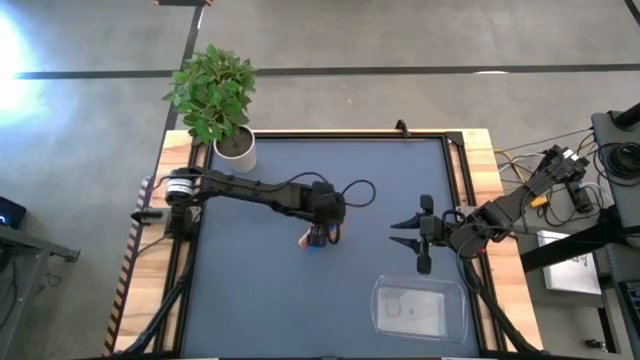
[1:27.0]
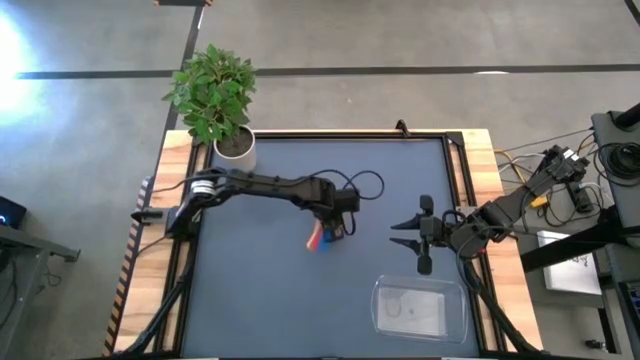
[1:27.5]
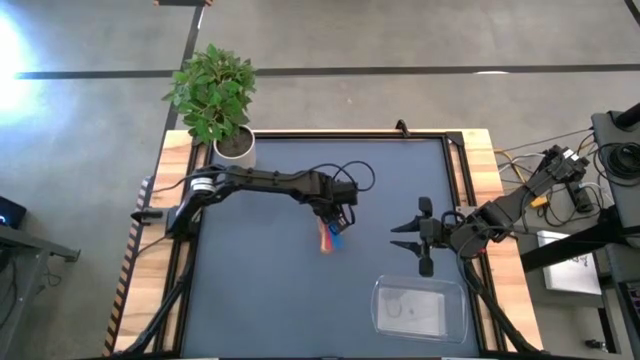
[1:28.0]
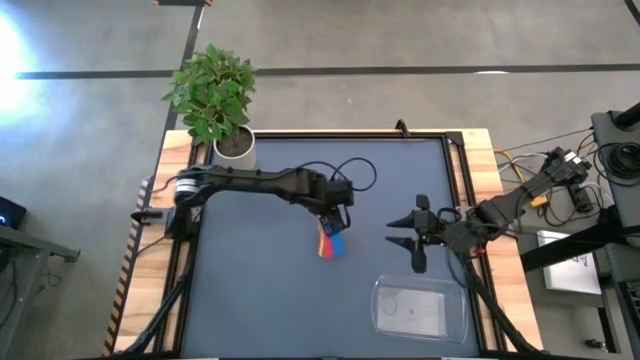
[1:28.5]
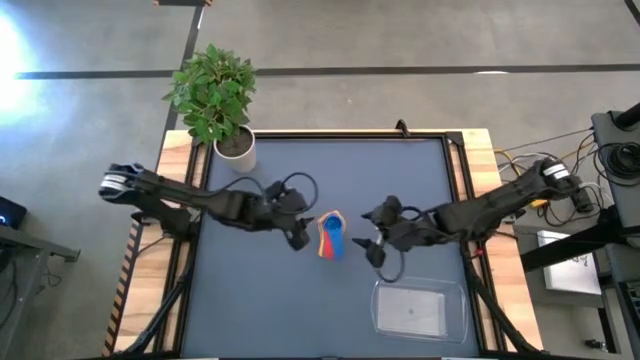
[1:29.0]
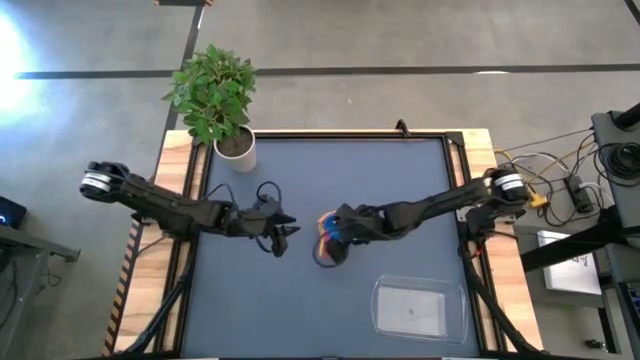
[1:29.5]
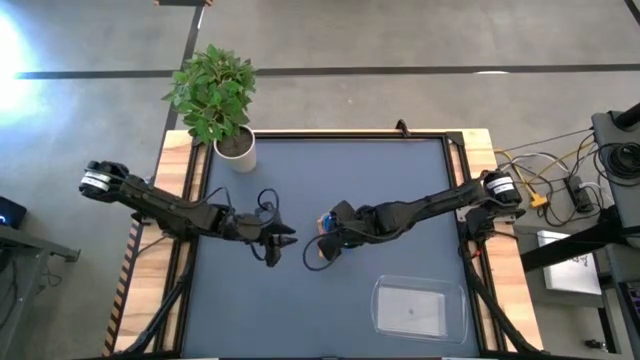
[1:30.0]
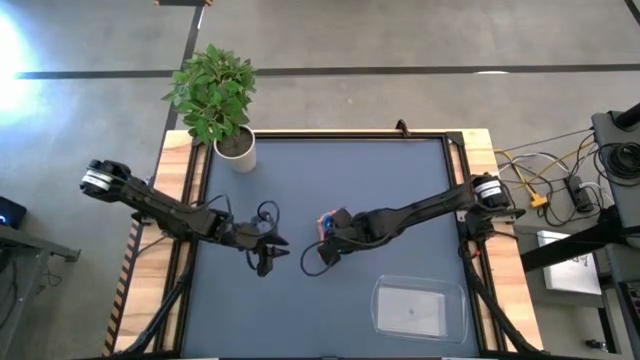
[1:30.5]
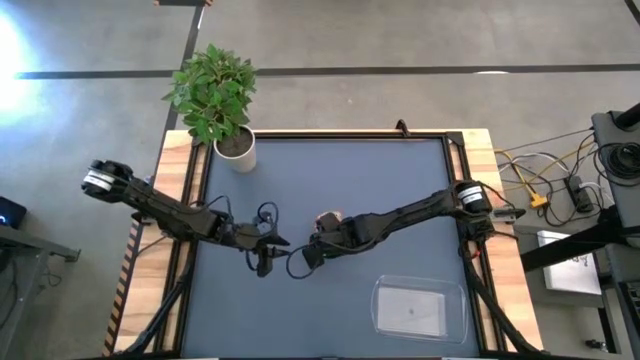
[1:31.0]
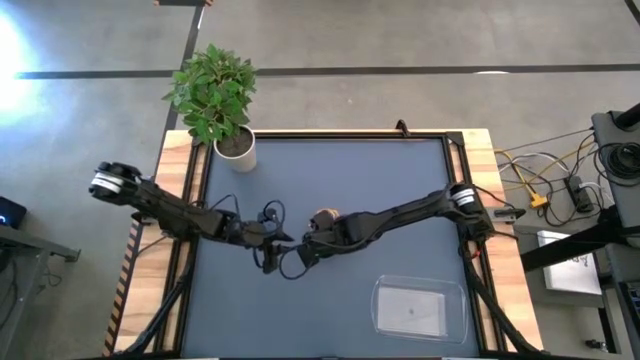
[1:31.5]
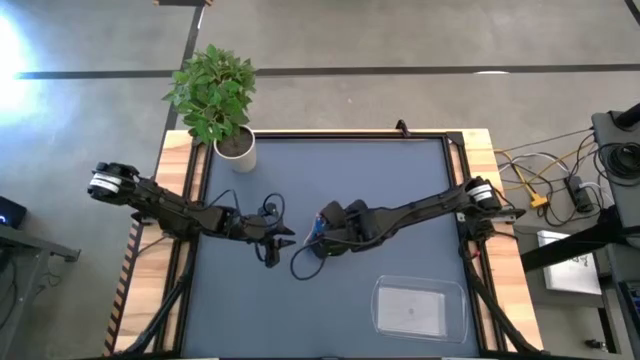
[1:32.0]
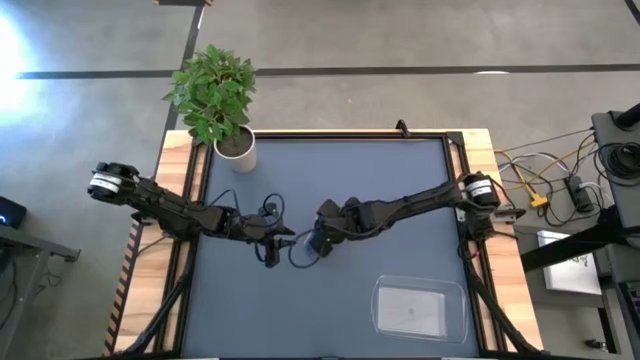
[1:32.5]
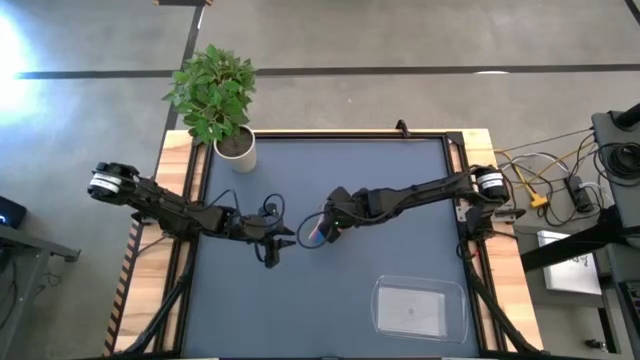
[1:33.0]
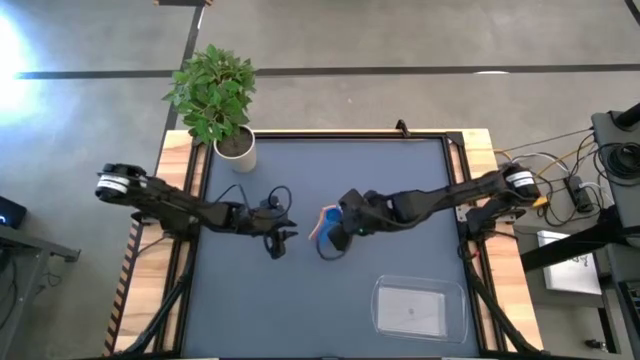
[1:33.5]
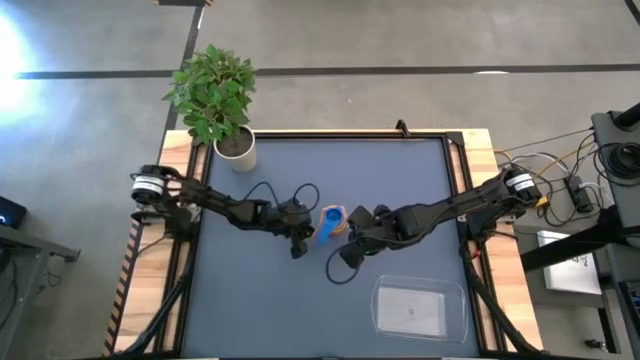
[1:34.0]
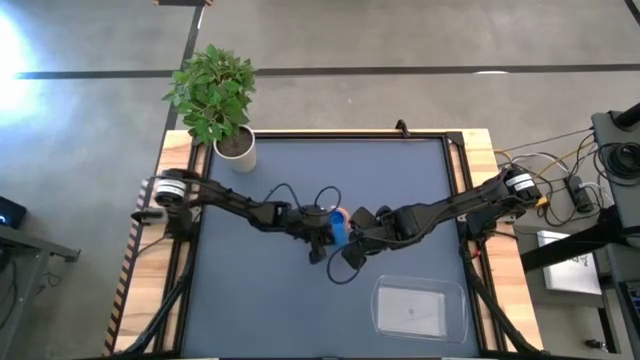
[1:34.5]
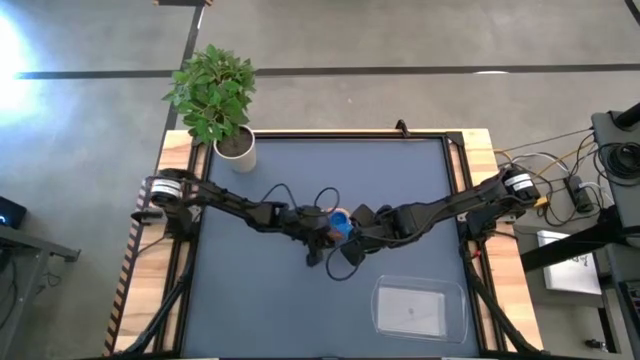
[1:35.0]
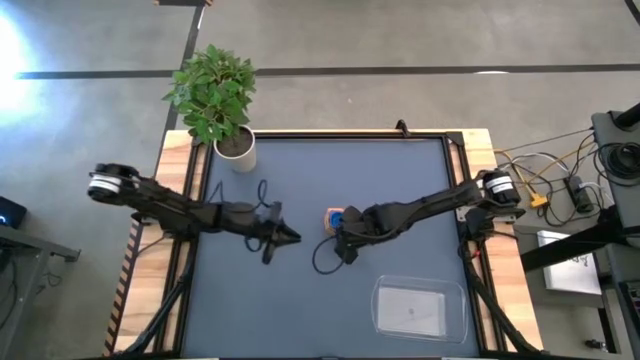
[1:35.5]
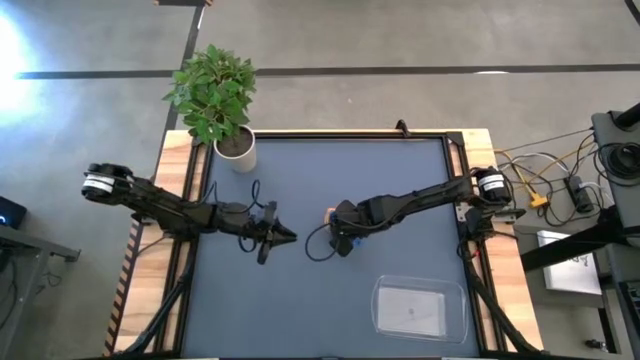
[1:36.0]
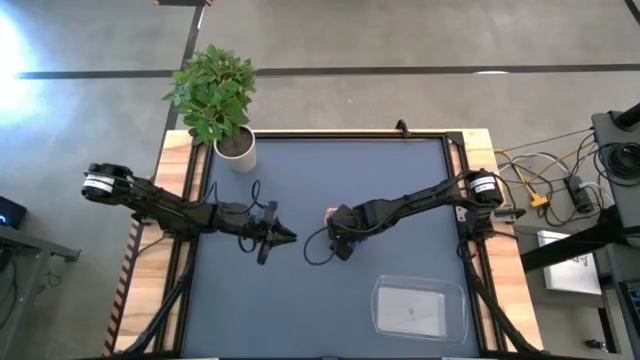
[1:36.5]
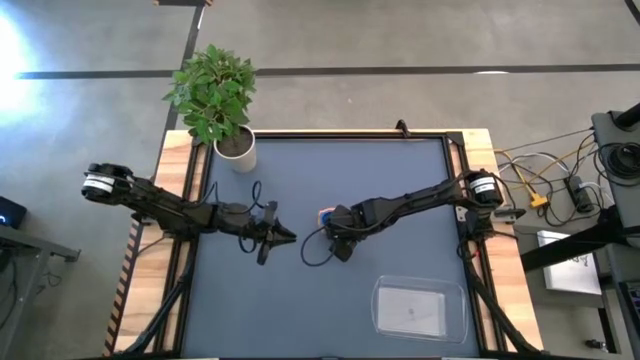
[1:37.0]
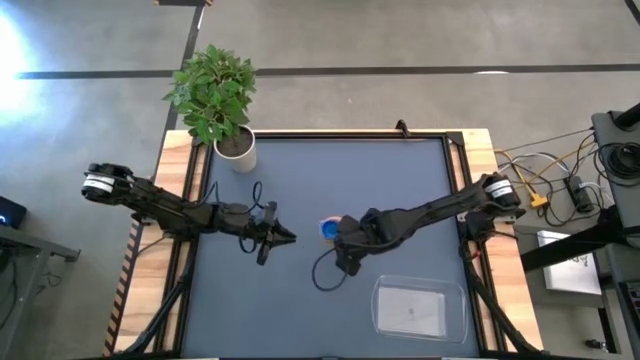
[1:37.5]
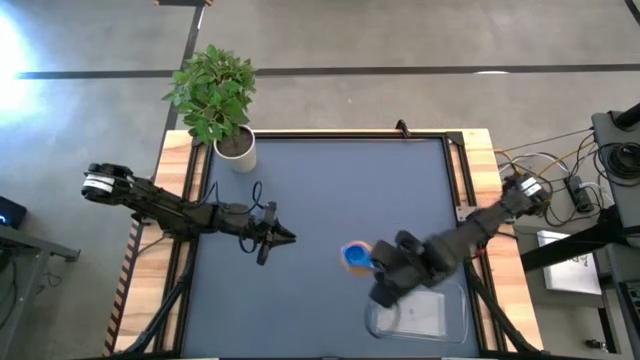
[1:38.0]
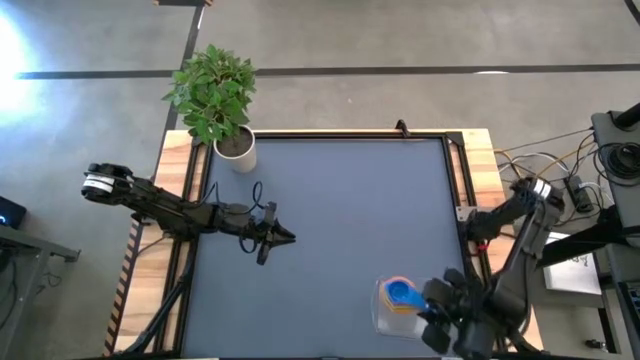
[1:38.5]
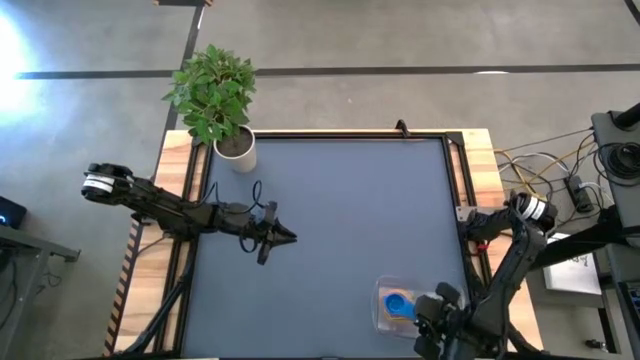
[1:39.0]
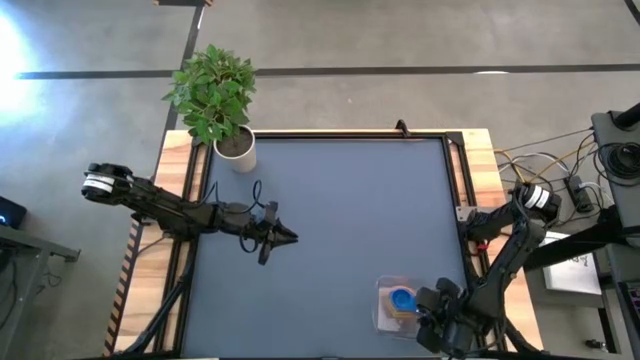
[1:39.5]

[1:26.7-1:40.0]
Task: Nest measuring cups in basket
Put the stack of measuring cups into the bin

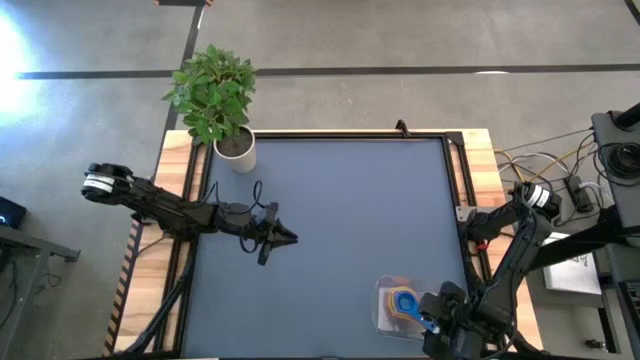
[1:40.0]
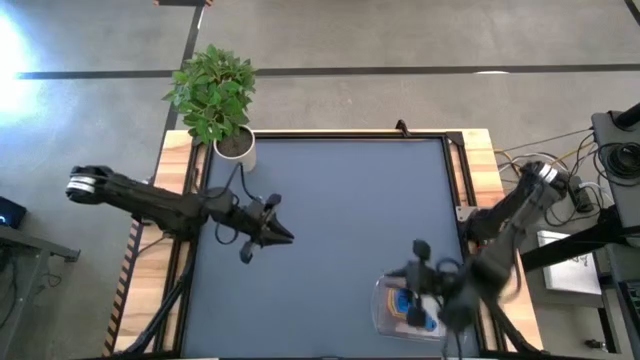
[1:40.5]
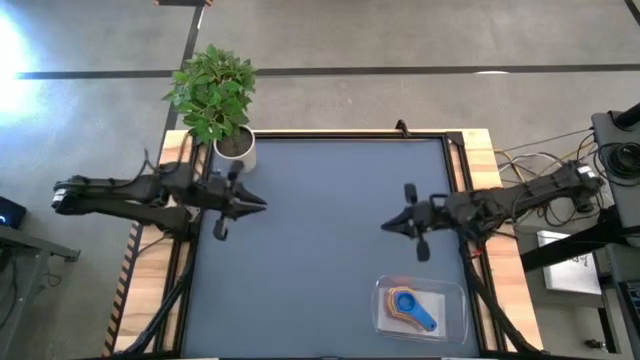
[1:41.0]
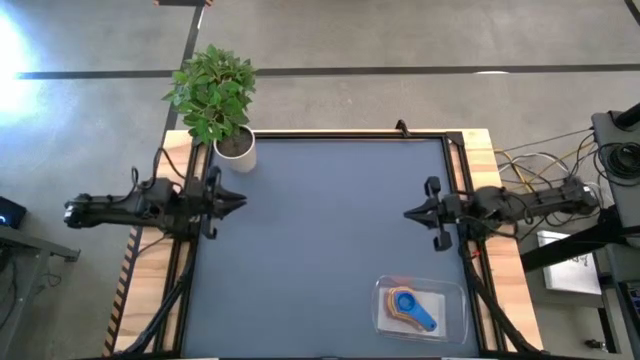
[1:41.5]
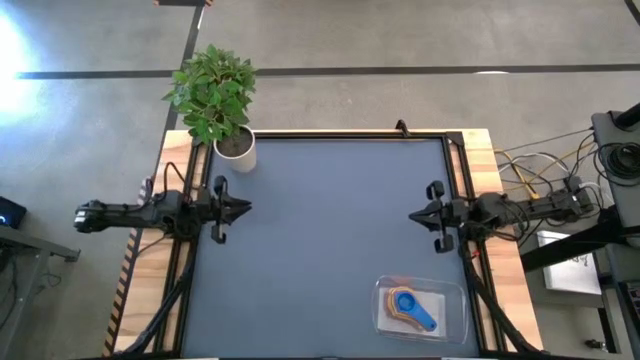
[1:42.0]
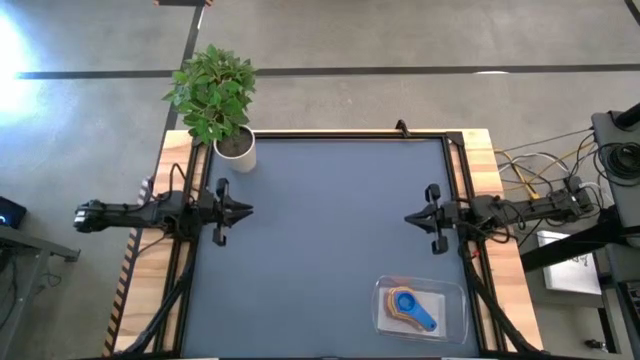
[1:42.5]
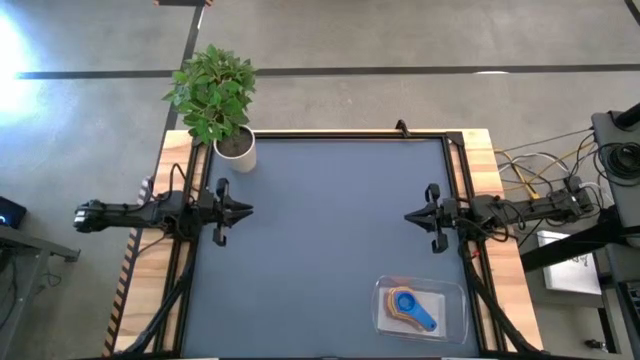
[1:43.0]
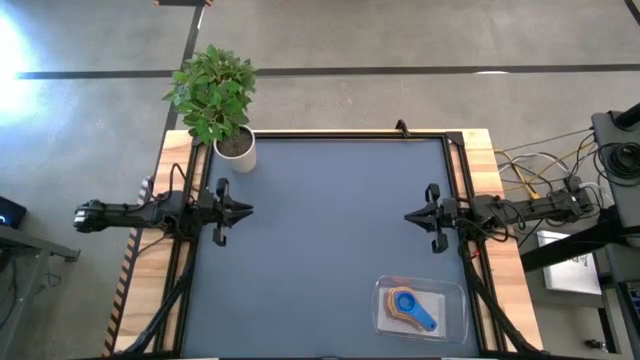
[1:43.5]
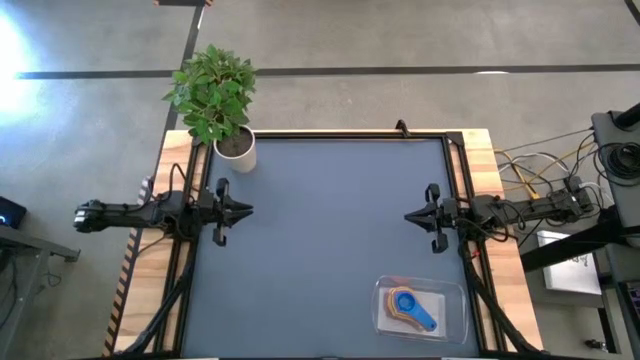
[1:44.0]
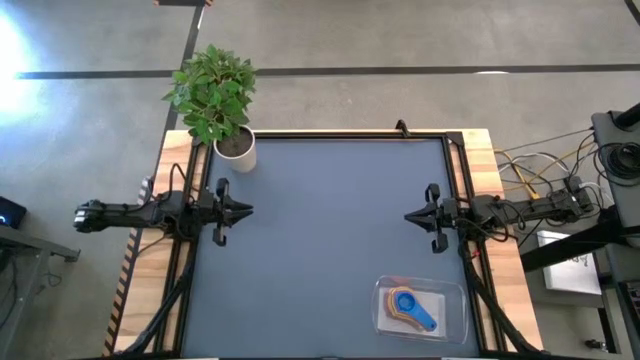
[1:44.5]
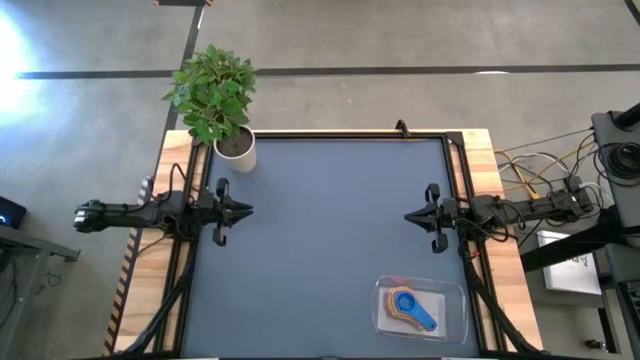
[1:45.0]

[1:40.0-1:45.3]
Return to Home Position

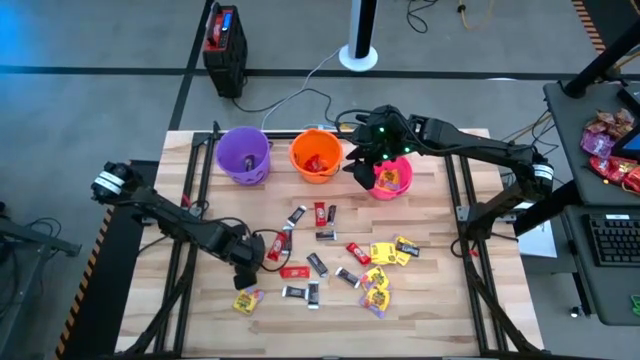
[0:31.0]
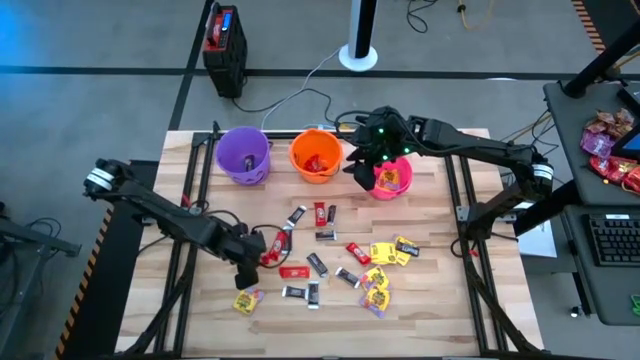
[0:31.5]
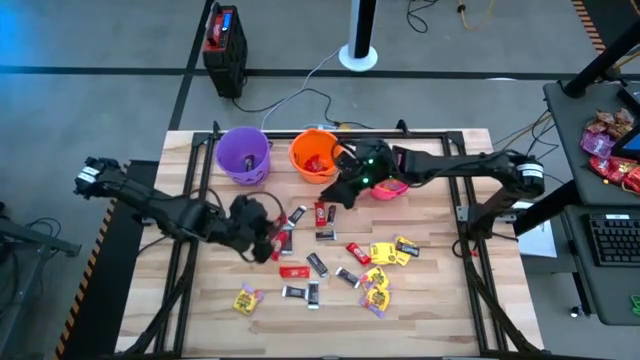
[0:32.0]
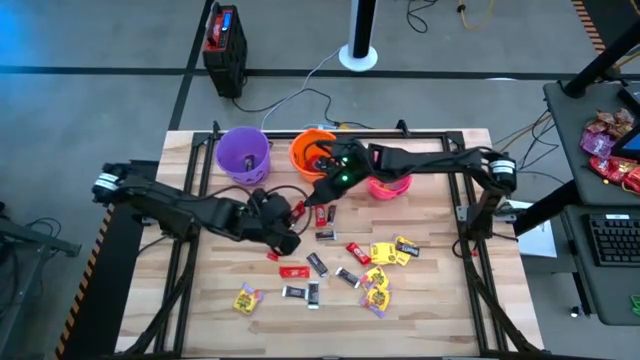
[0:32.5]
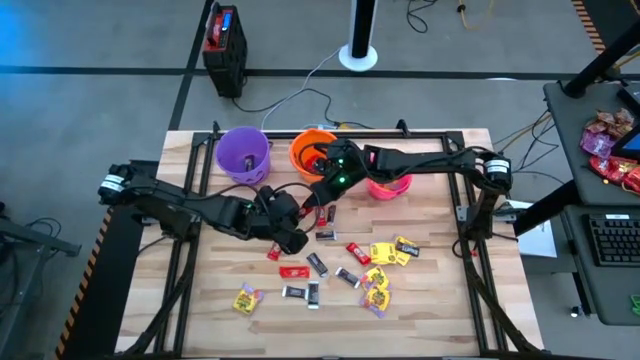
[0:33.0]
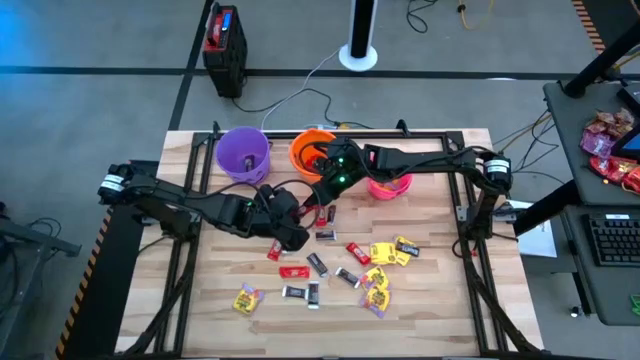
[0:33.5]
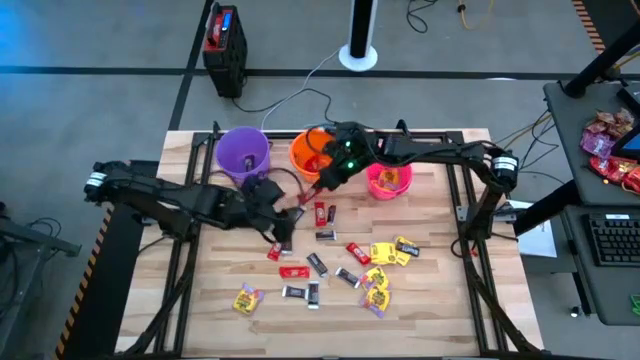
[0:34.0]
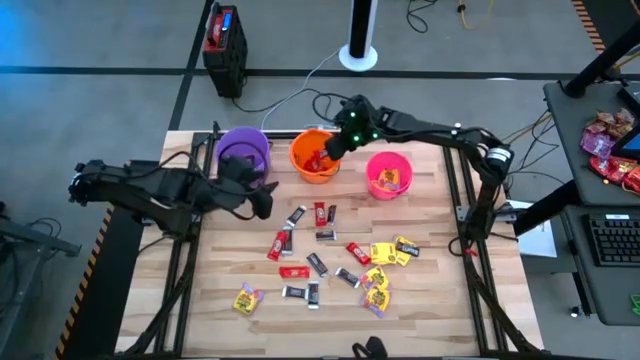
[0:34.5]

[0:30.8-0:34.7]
Task: Sort candy by brand, put in halloween buckets
Put the red candy into the orange bucket
